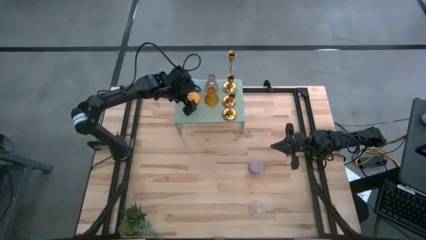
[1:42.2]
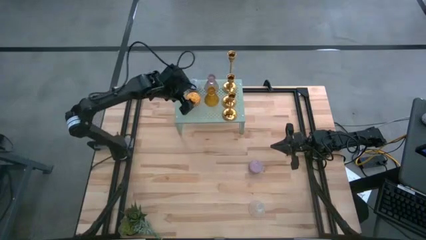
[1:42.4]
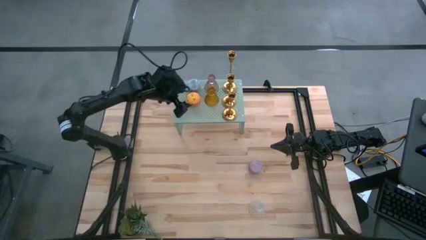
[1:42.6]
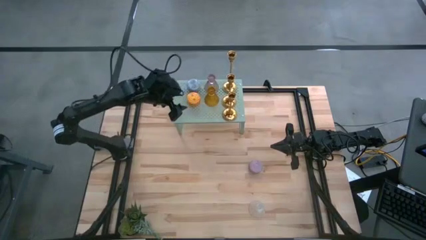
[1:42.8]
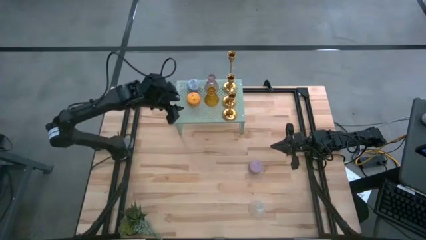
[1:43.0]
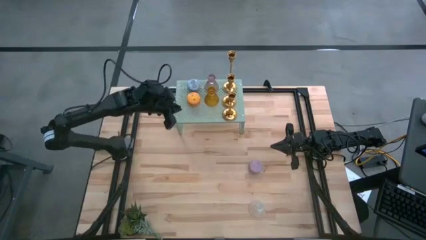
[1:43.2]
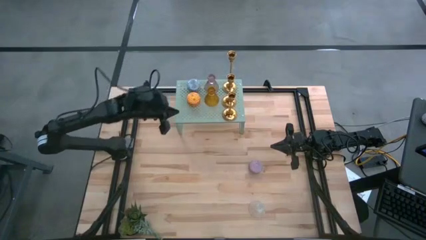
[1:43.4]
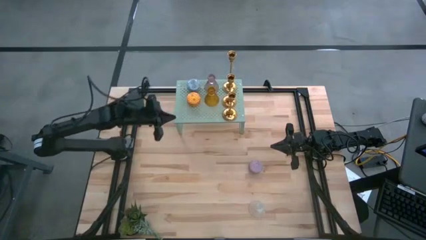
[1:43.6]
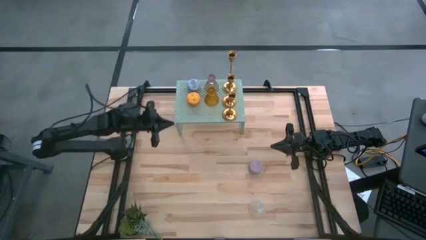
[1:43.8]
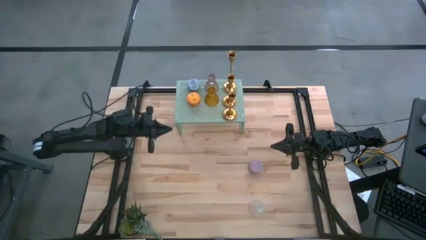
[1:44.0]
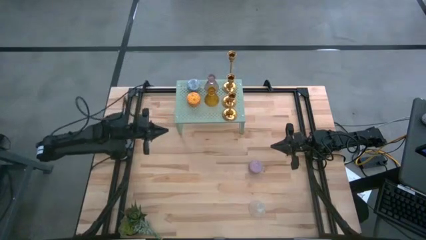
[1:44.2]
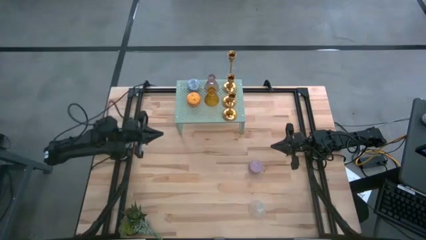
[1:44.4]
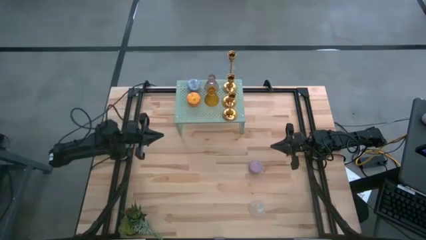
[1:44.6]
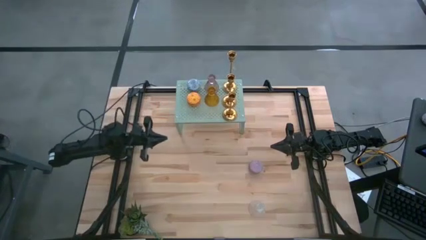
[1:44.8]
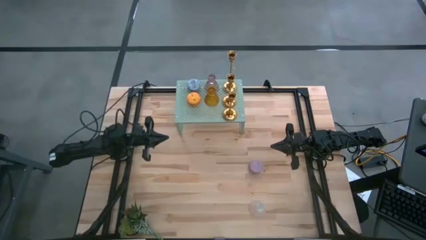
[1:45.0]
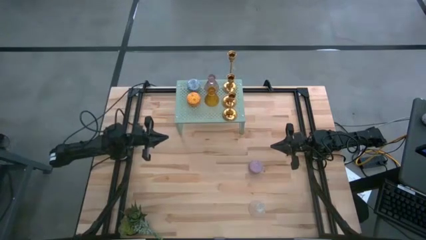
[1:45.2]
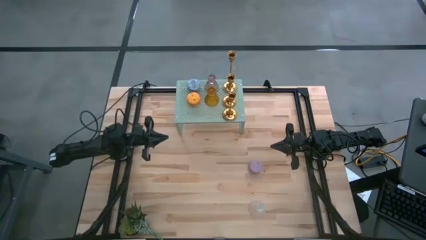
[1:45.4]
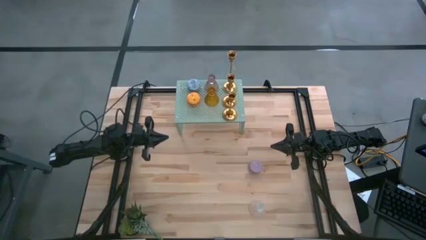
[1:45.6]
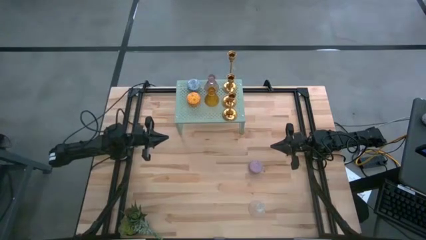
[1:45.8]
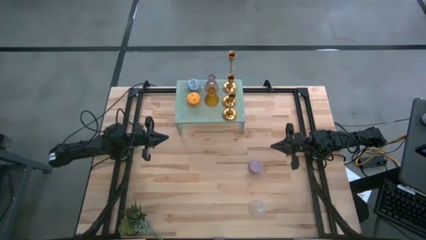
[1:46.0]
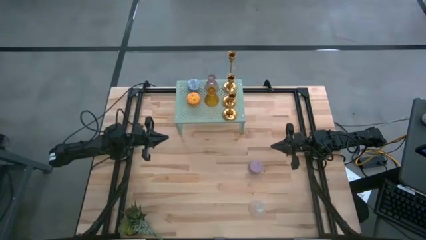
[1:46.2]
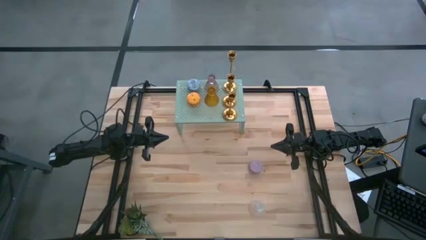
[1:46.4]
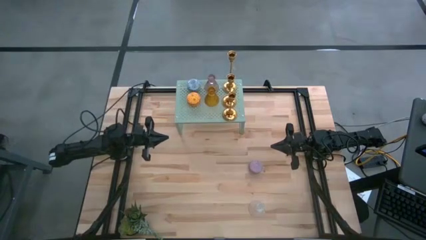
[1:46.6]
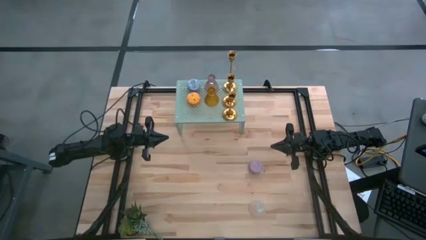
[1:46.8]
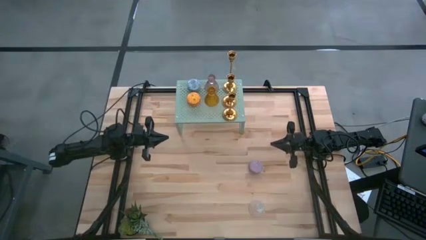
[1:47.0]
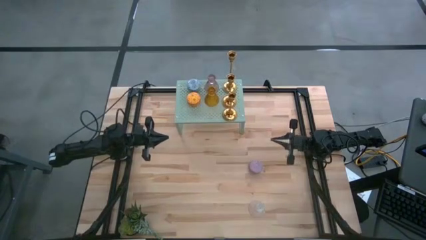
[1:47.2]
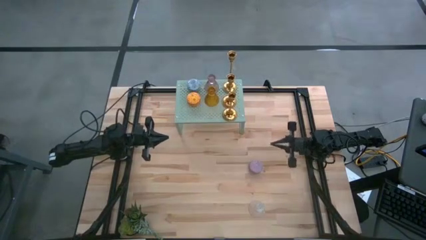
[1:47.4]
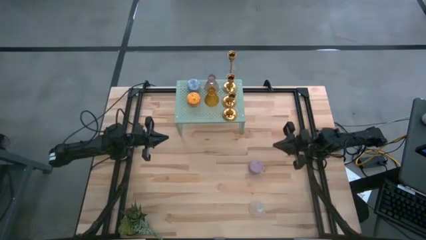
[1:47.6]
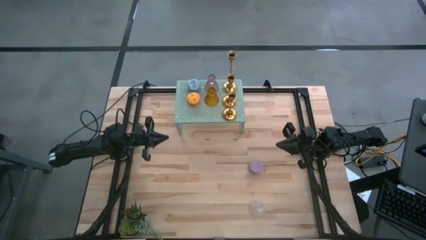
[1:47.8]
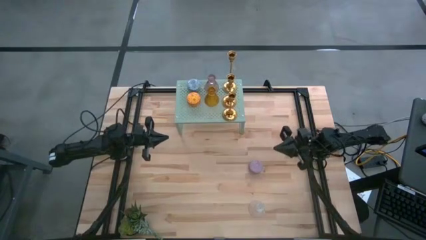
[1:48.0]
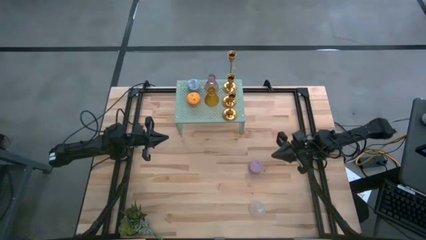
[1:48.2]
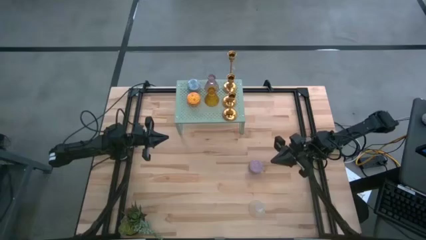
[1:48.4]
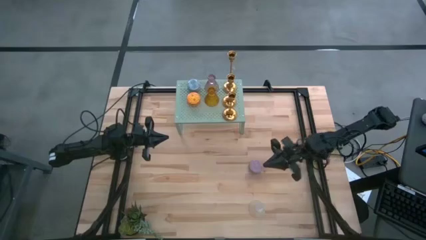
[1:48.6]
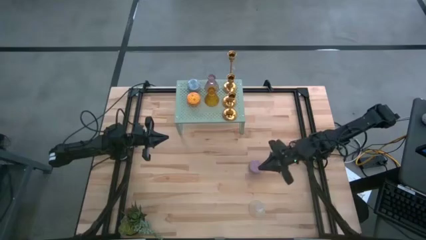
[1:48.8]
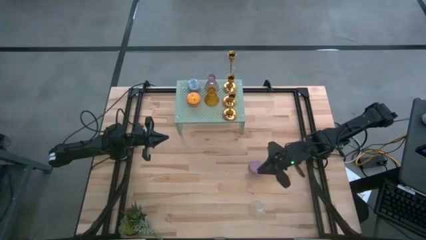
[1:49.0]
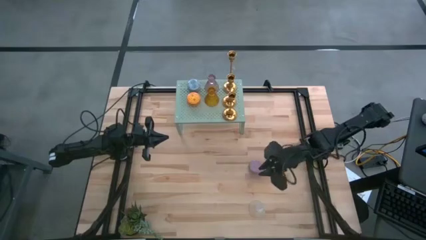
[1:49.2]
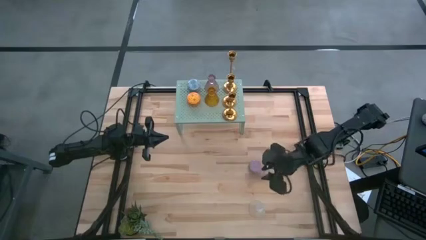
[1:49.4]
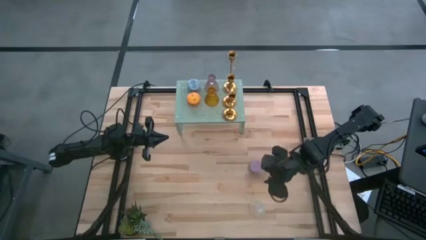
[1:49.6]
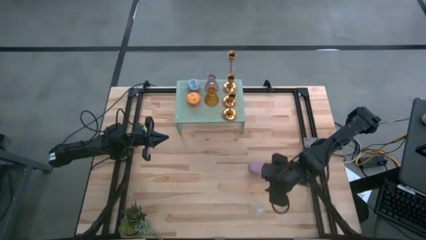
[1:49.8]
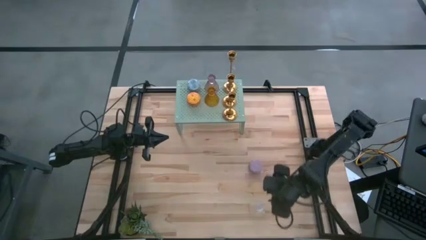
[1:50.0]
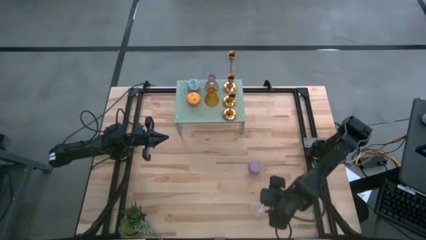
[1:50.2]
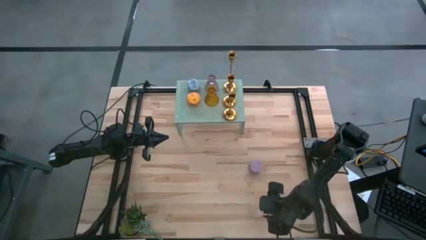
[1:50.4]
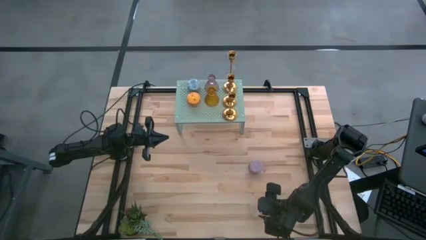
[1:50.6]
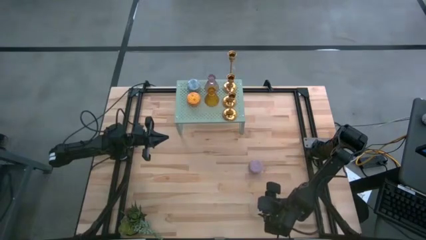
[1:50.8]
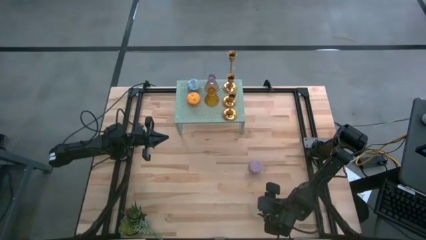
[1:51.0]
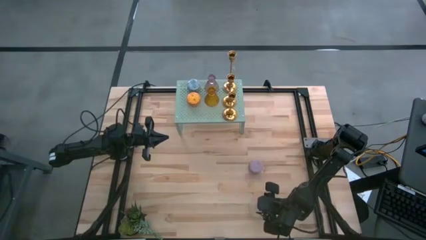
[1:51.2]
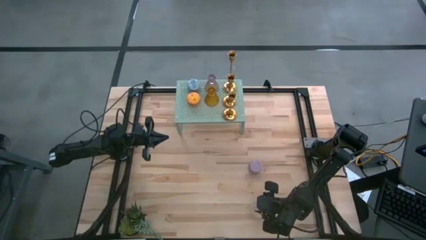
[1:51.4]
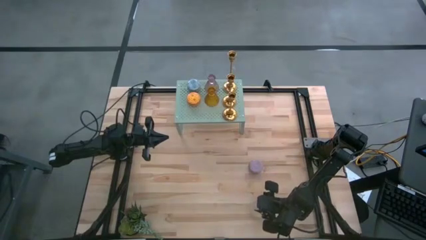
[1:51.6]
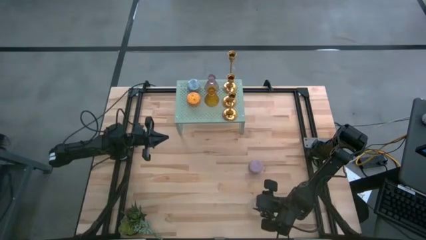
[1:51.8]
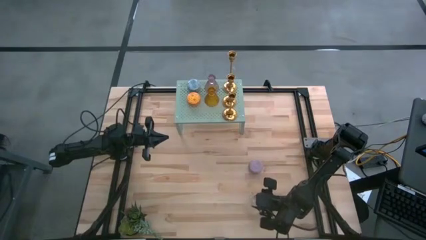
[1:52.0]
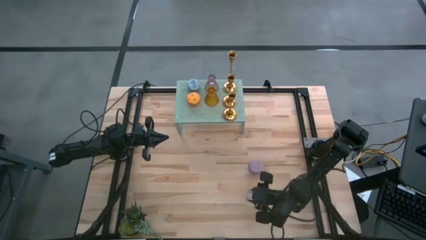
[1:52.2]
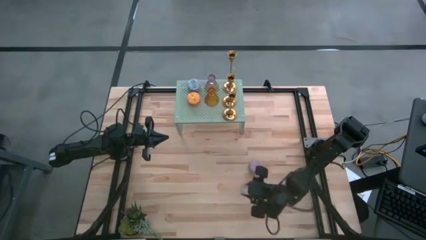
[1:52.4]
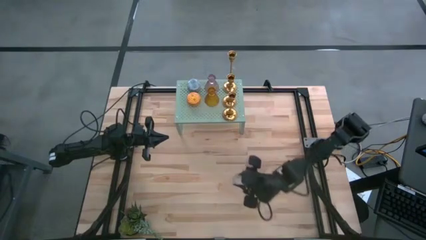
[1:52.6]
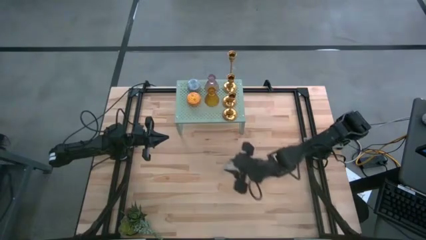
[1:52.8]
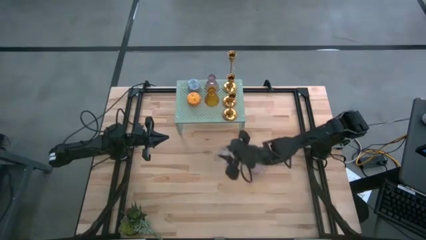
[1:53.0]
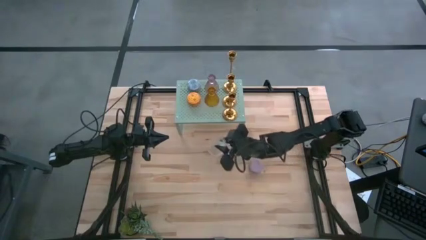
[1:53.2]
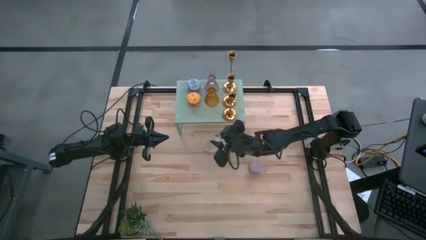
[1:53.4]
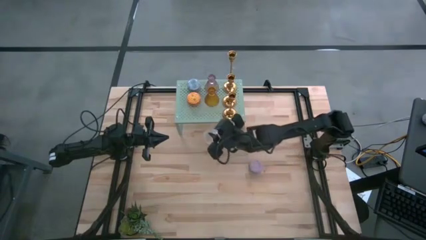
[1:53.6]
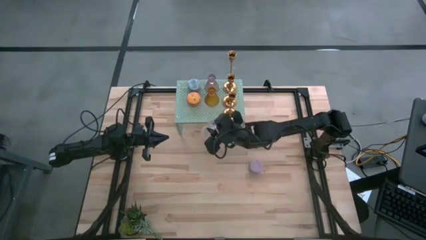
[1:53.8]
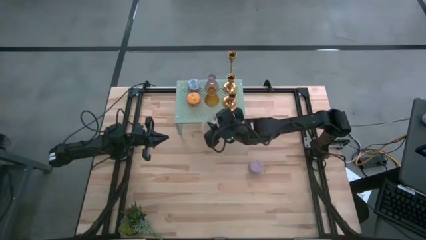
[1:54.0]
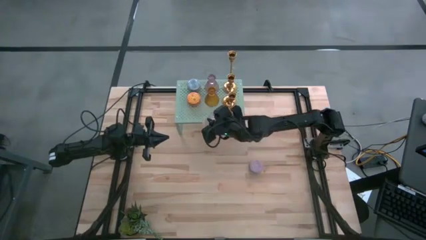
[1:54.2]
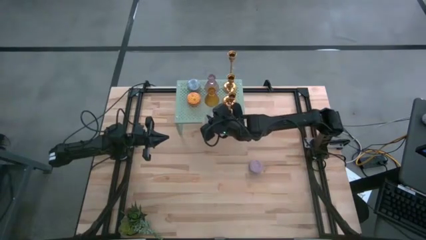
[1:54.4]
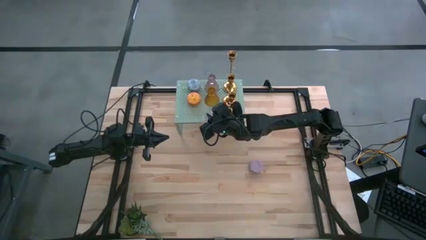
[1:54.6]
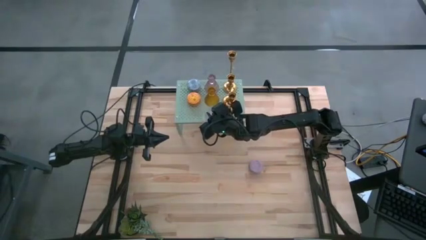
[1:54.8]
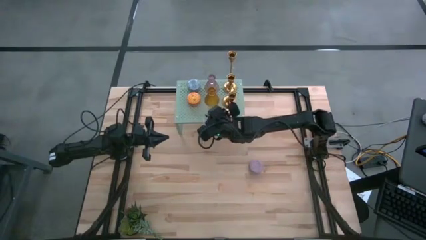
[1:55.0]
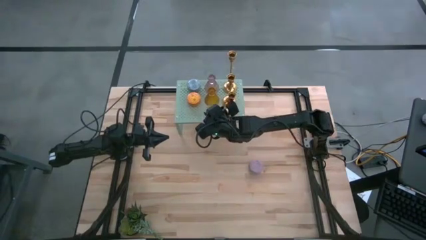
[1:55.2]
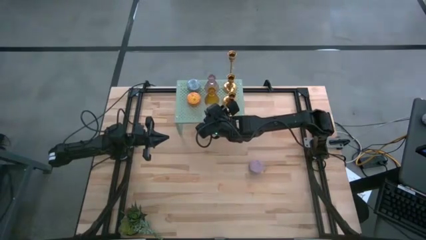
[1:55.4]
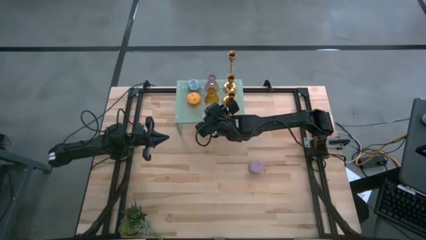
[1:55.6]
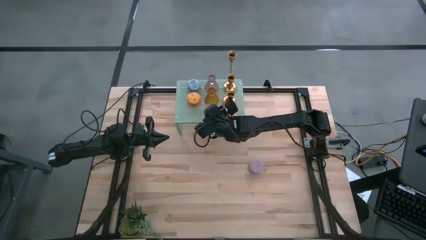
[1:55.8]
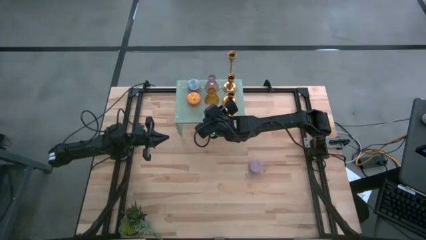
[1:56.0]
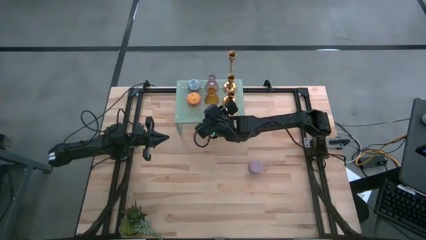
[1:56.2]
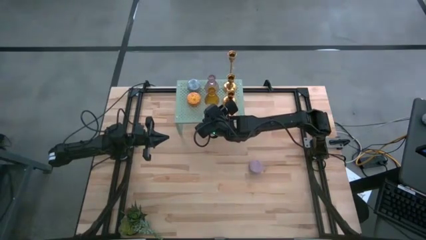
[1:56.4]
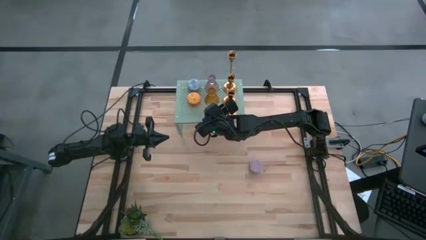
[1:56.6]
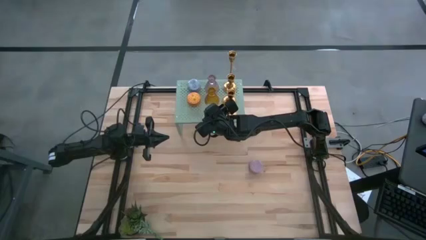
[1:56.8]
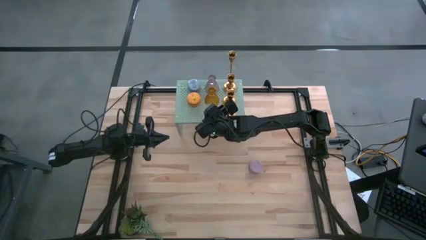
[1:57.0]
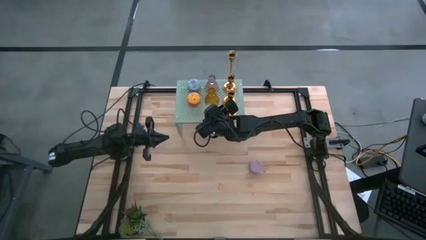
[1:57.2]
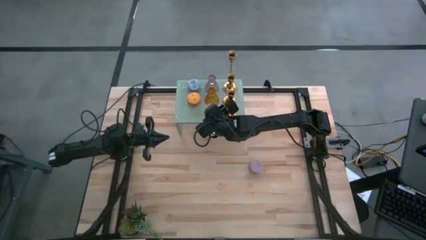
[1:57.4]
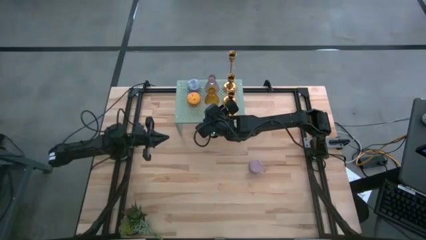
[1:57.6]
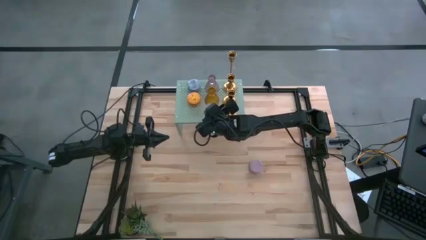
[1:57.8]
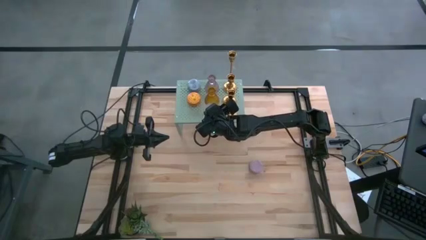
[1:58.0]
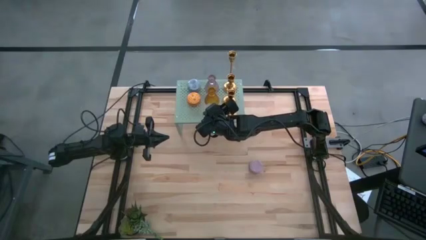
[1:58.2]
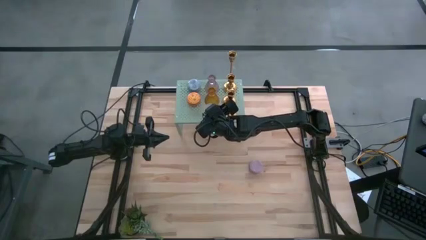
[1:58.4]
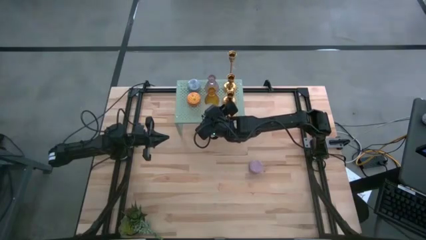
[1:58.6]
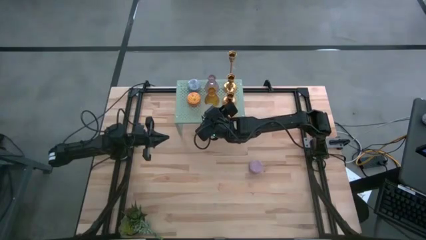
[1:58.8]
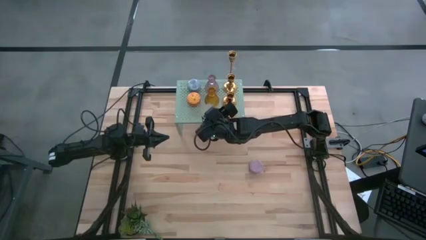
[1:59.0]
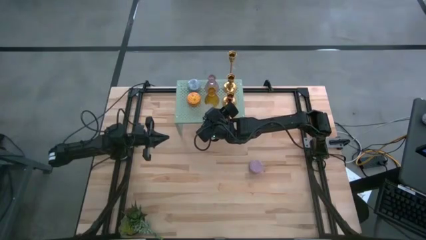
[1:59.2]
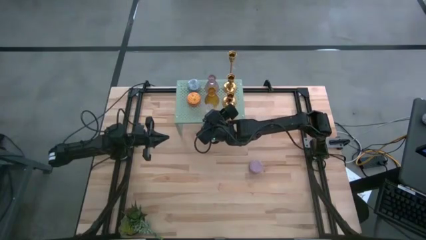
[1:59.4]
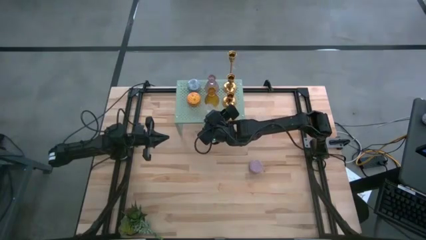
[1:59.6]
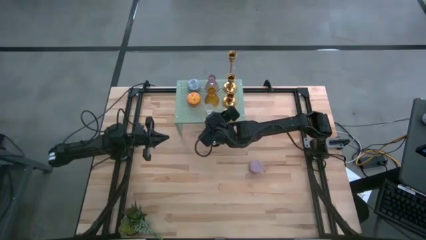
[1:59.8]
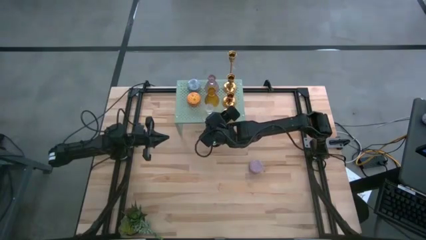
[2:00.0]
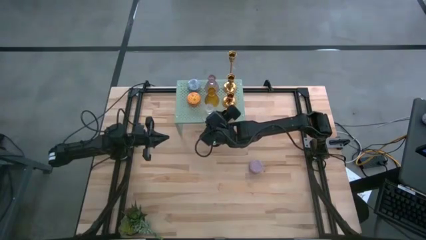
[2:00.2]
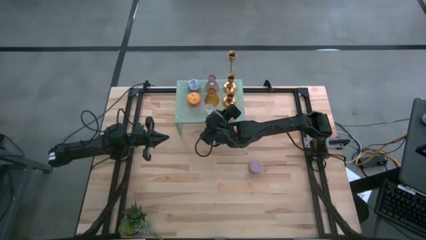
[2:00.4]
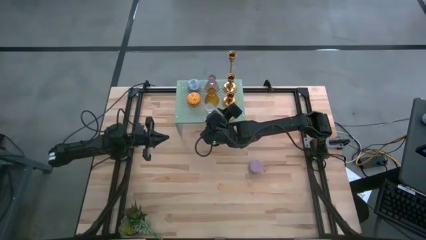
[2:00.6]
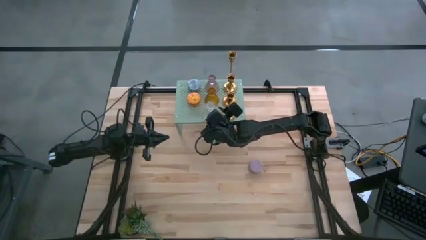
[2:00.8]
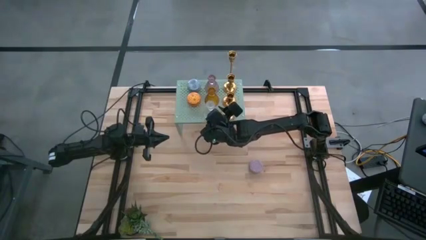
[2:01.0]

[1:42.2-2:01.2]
Task: Pick & Place candle stick holders
Put the transparent glass candle holder on the shelf aligned with the yellow glass candle holder
